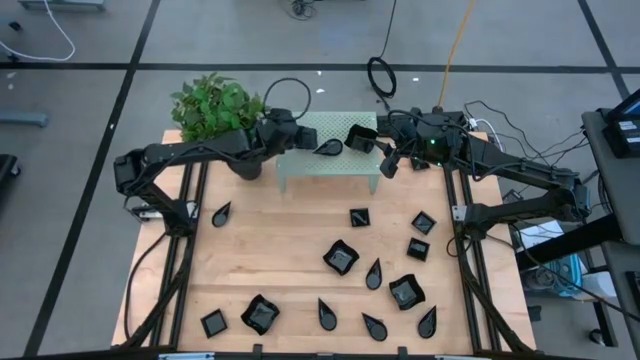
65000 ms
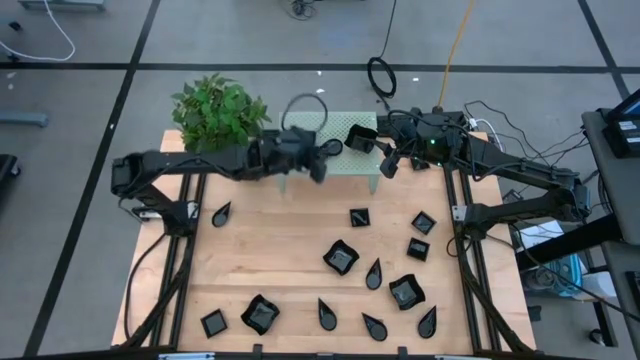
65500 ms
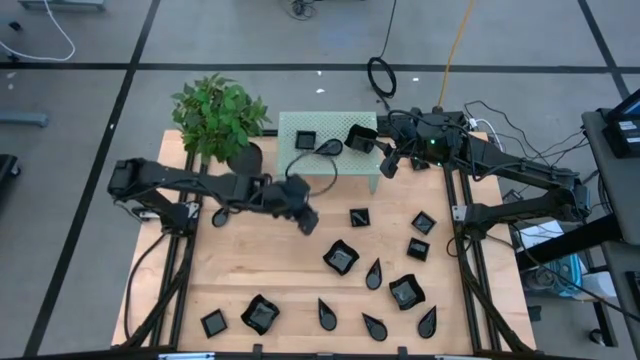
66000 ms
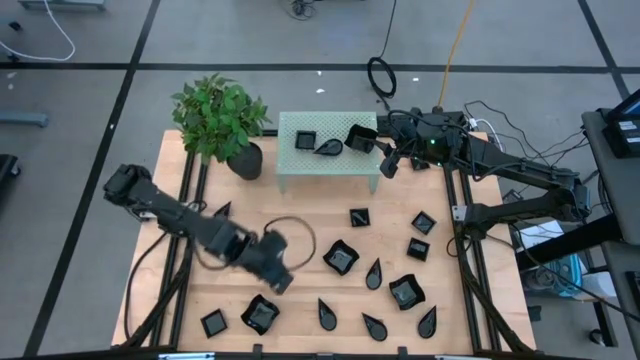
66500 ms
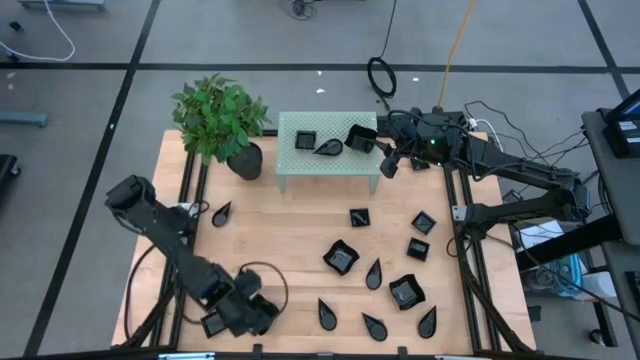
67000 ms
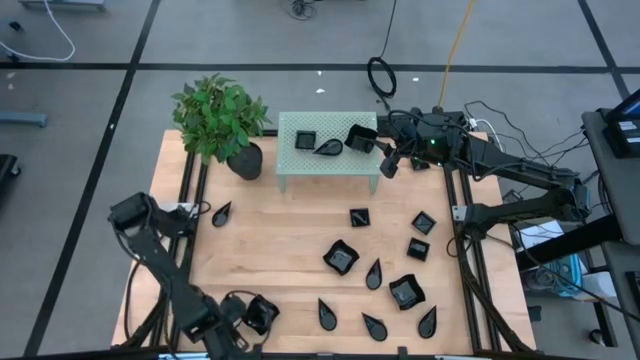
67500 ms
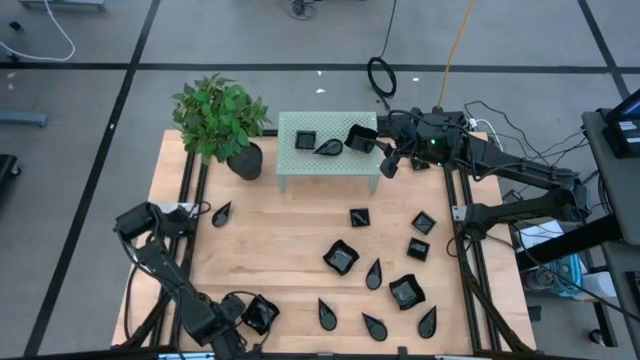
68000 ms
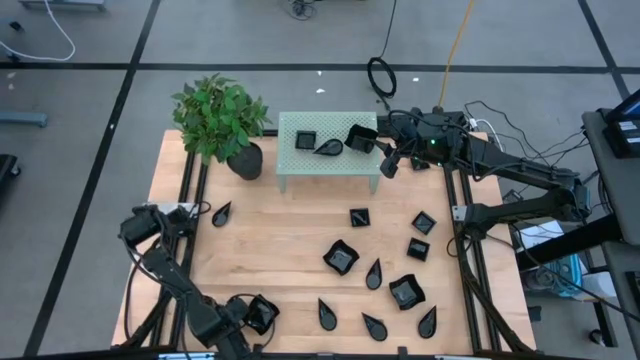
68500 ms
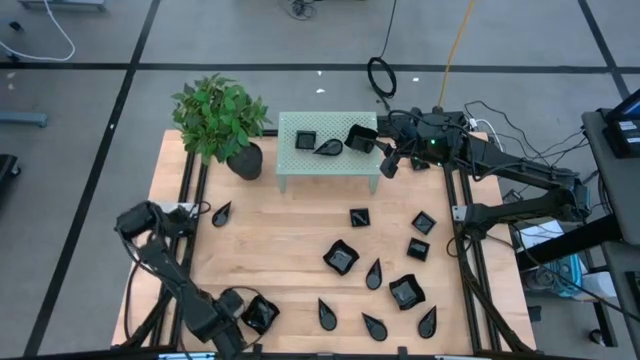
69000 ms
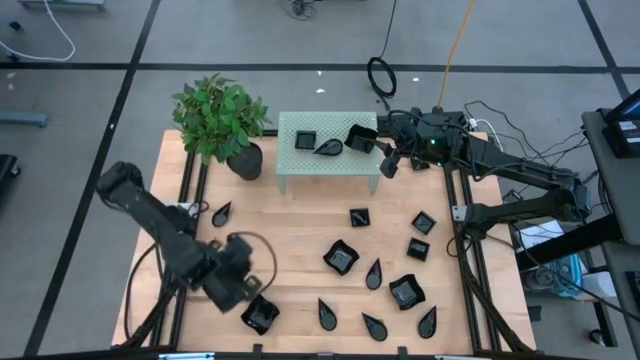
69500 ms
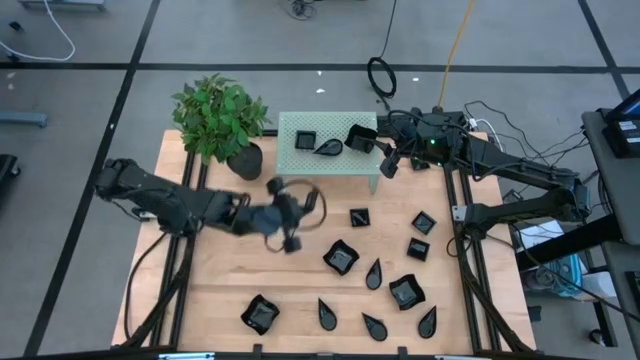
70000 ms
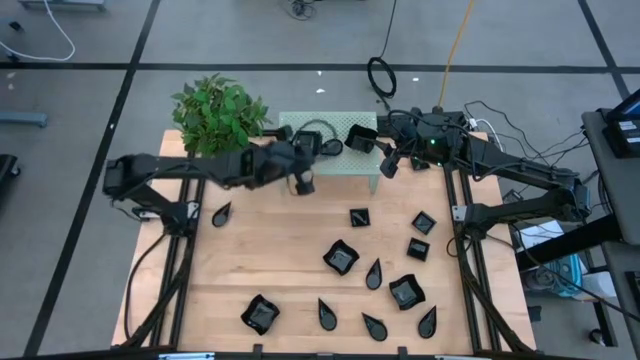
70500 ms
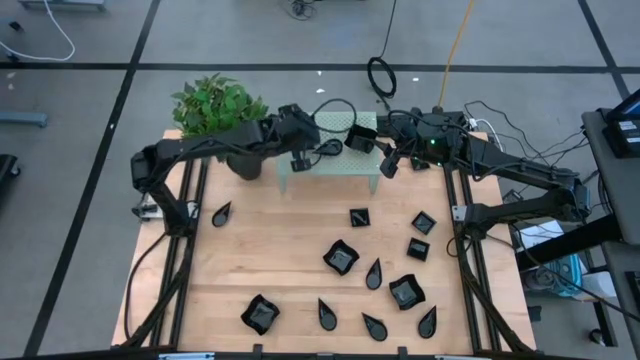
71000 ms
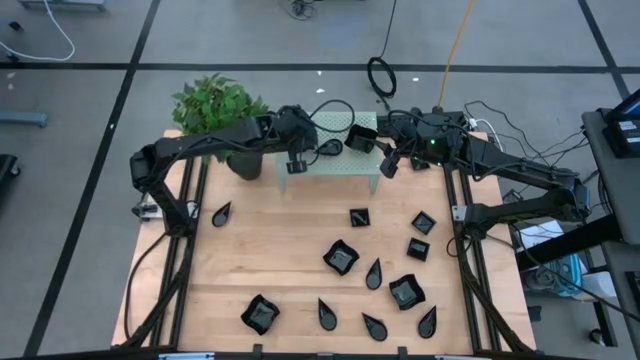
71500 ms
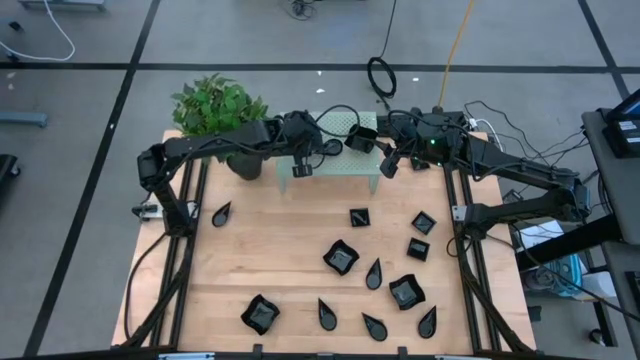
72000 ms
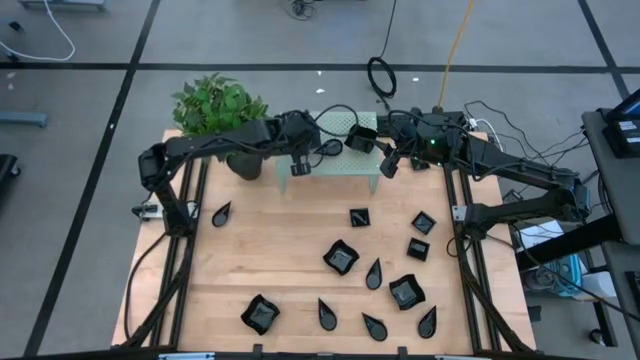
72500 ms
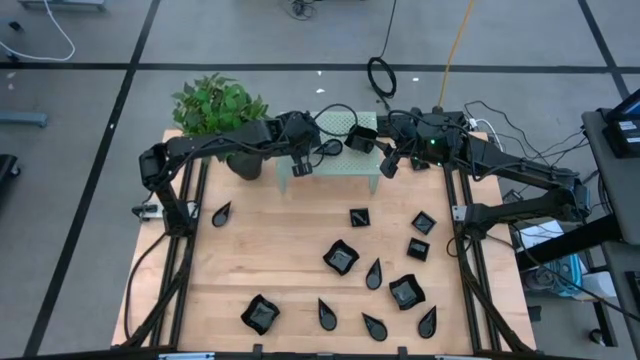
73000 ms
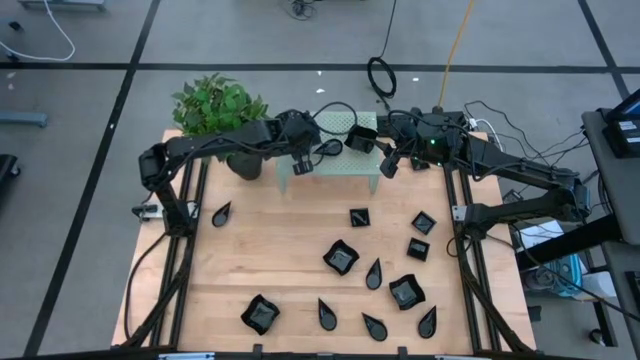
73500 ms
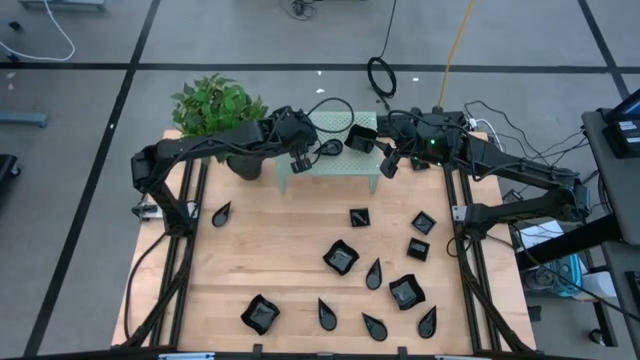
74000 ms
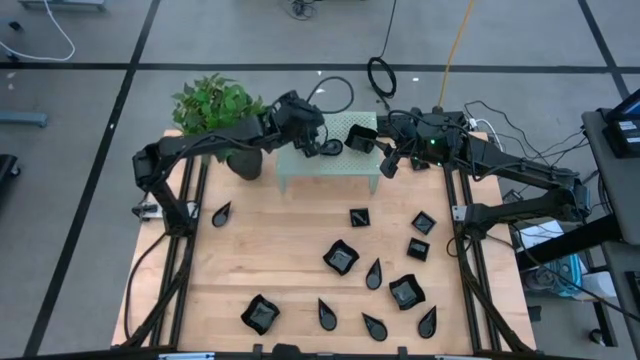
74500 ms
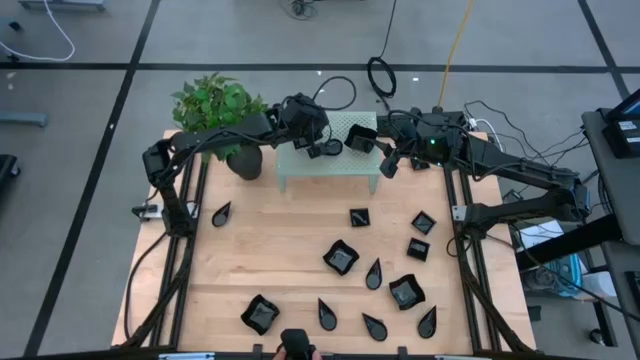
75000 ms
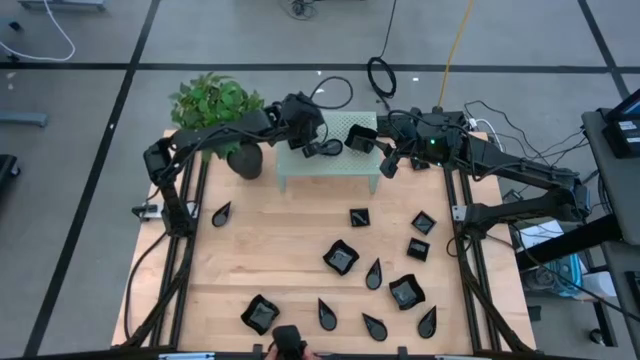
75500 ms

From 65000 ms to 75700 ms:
Task: Pick & Place Mini shaped plates
Stack the square plate on top of the other square plate on the shelf

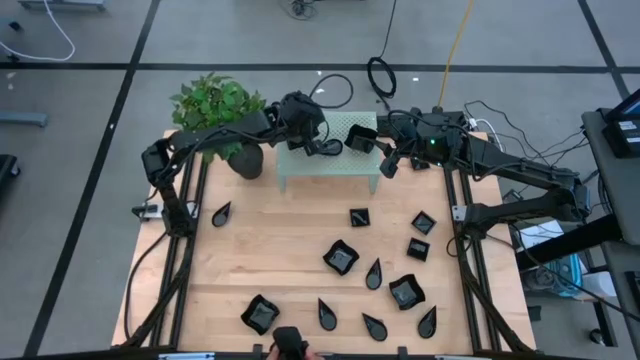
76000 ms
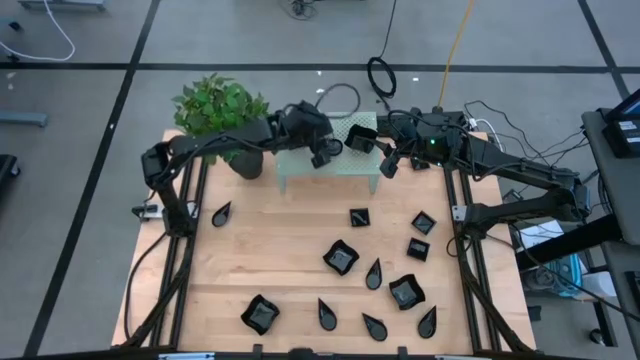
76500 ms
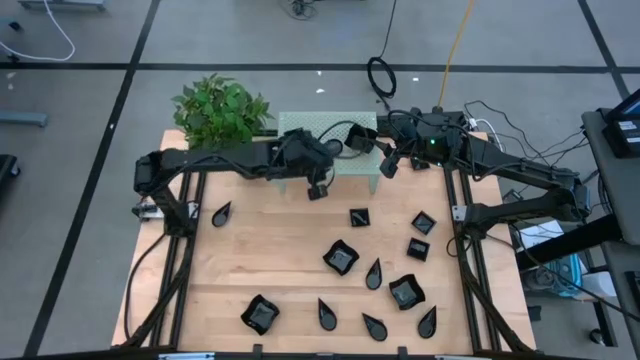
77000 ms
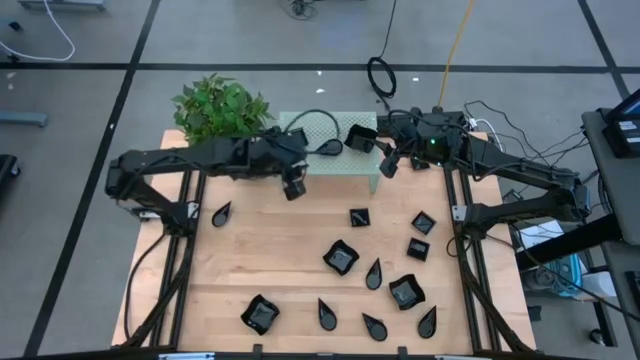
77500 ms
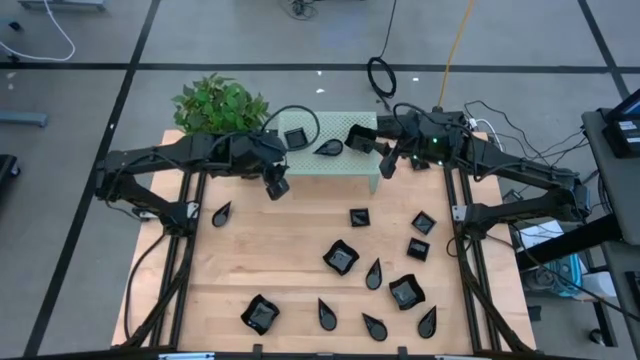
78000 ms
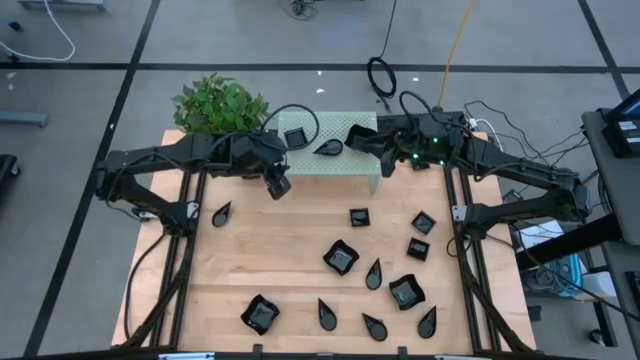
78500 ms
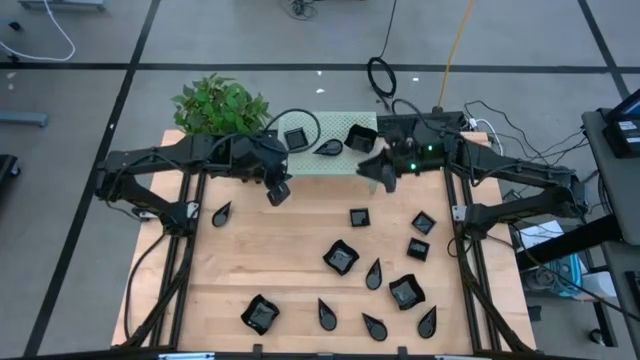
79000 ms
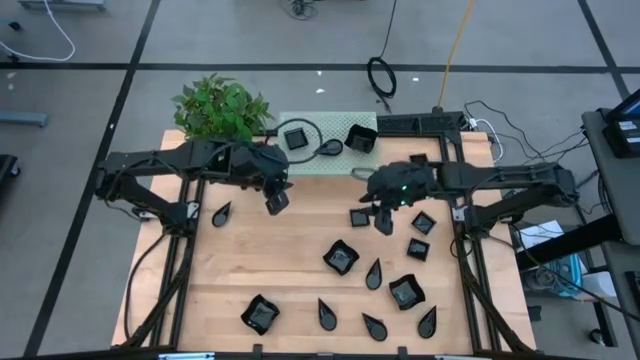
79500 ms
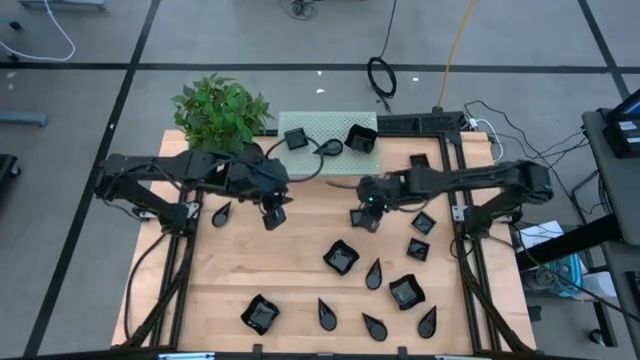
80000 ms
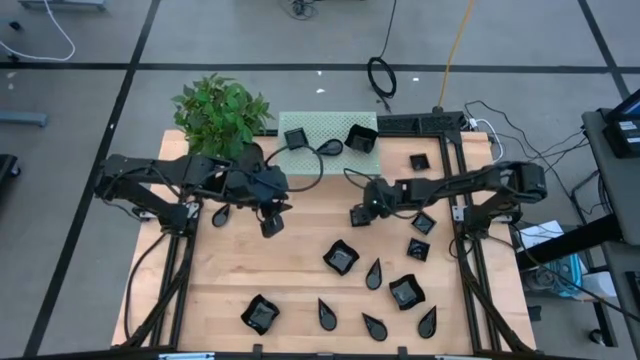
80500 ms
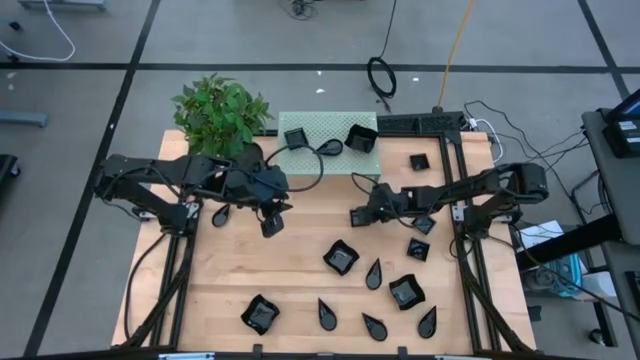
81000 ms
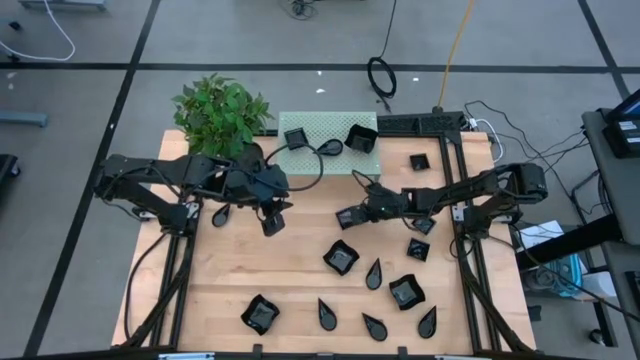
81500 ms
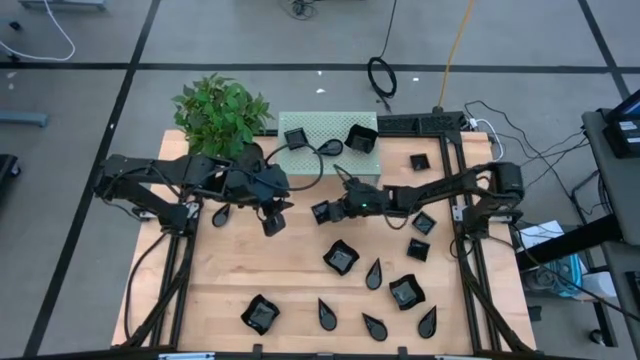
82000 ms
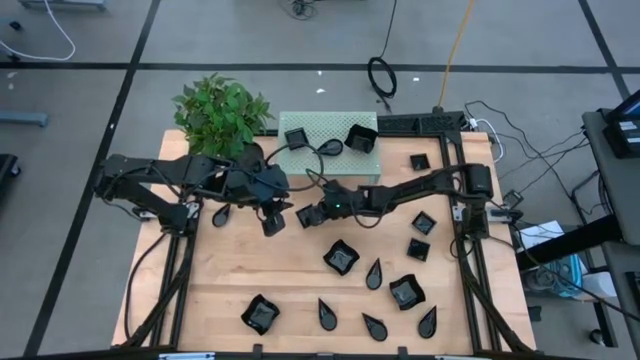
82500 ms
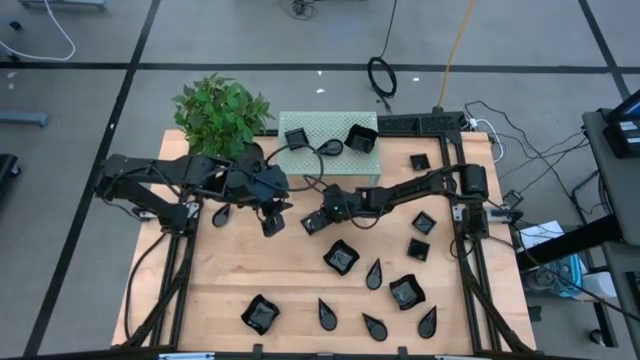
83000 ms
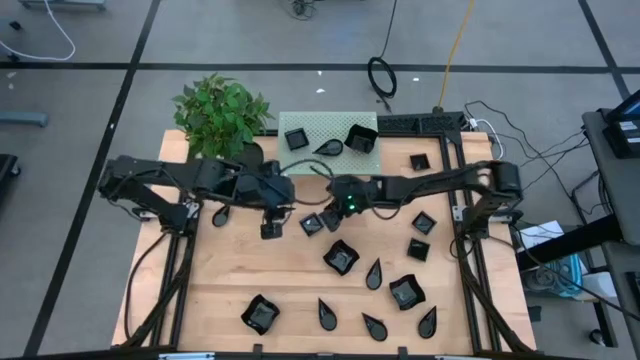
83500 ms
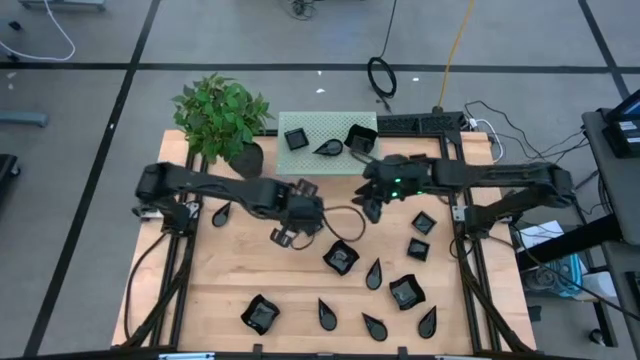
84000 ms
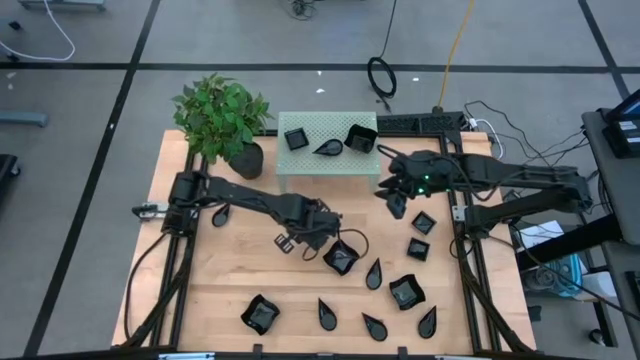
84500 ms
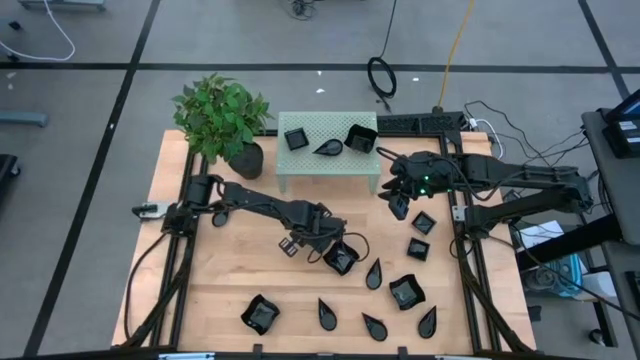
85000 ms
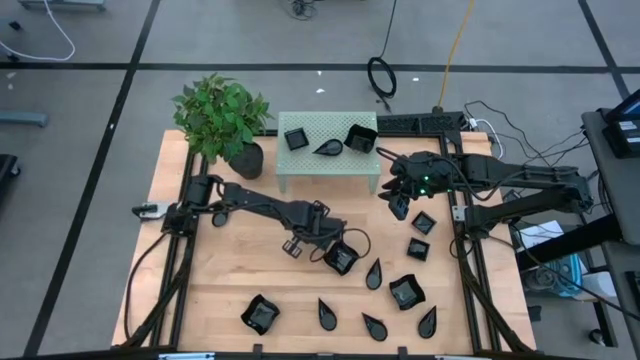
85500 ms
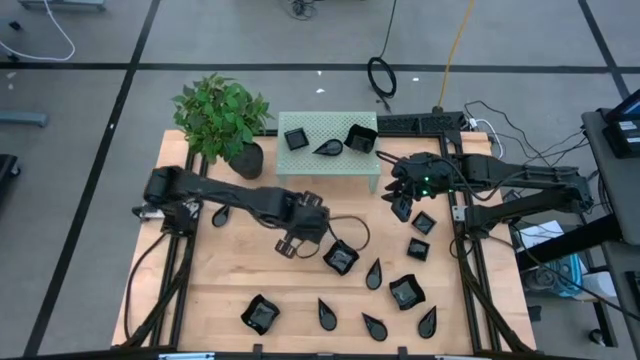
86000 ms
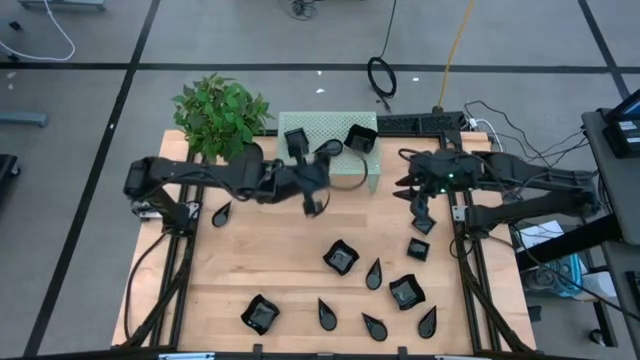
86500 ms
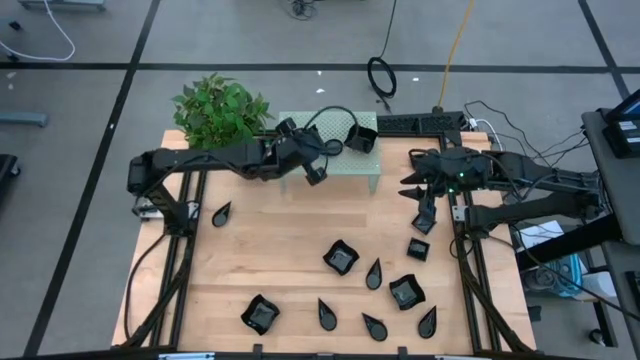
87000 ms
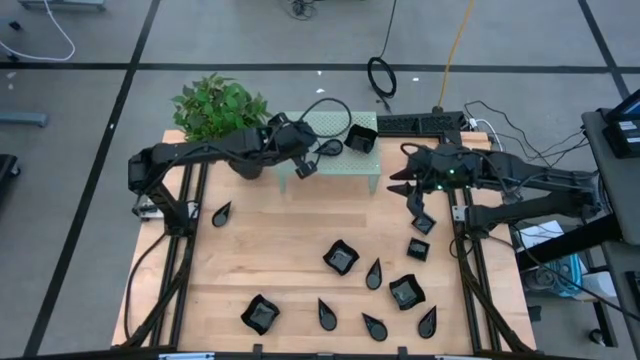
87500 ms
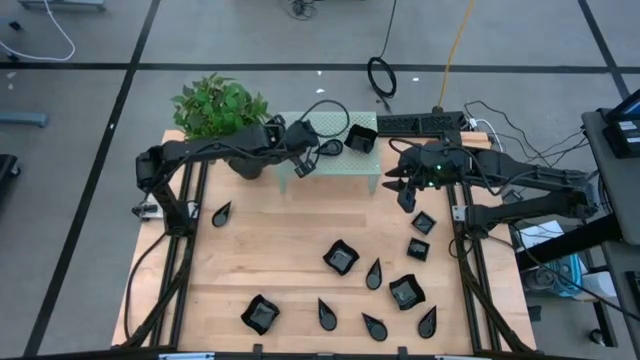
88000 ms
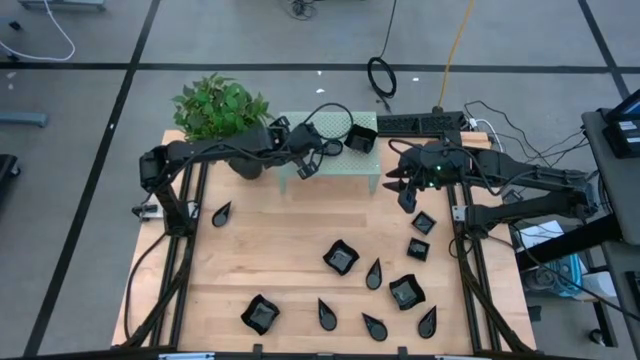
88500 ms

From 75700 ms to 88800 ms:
Stack the square plate on top of the other square plate on the shelf
